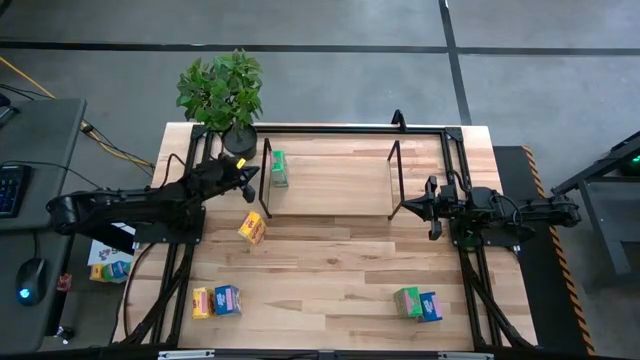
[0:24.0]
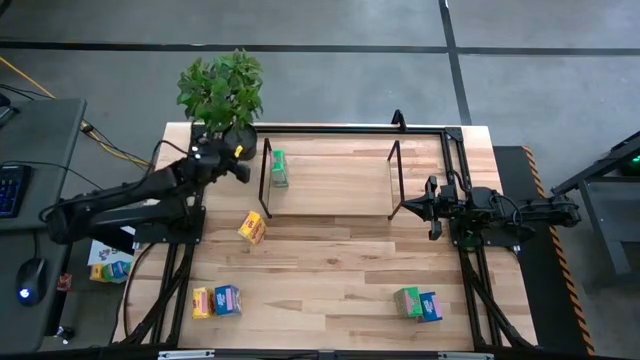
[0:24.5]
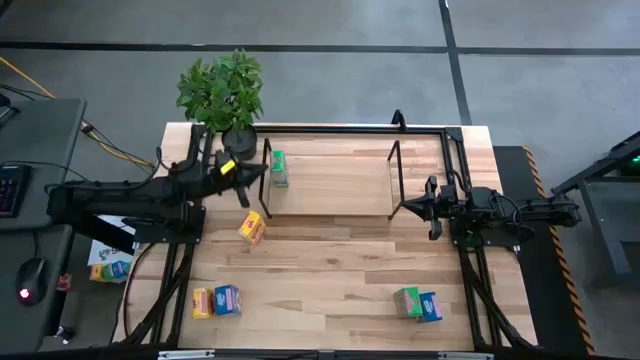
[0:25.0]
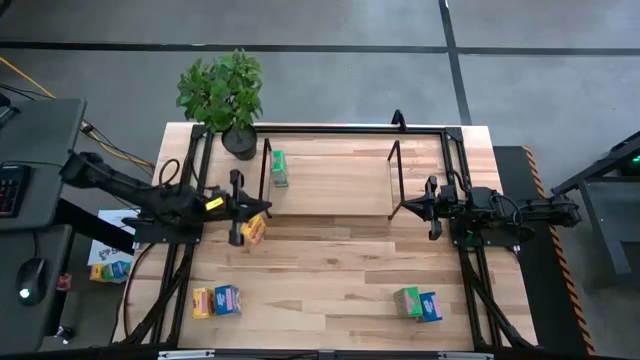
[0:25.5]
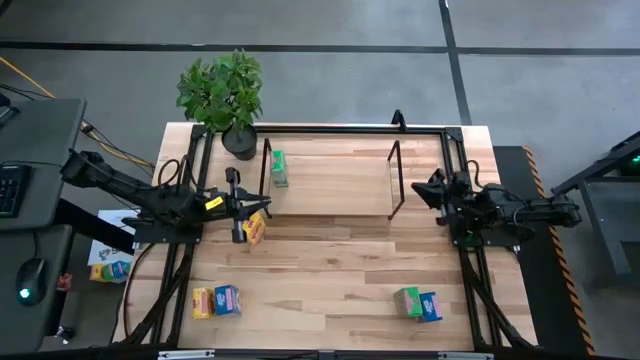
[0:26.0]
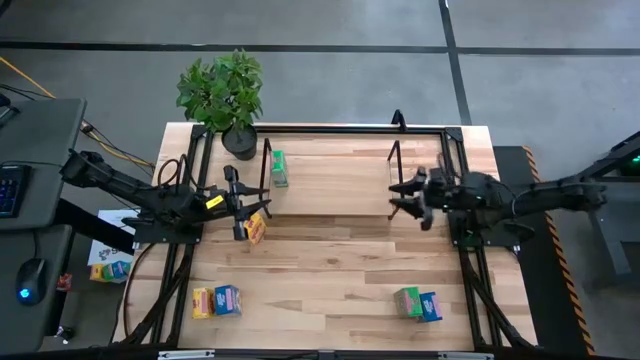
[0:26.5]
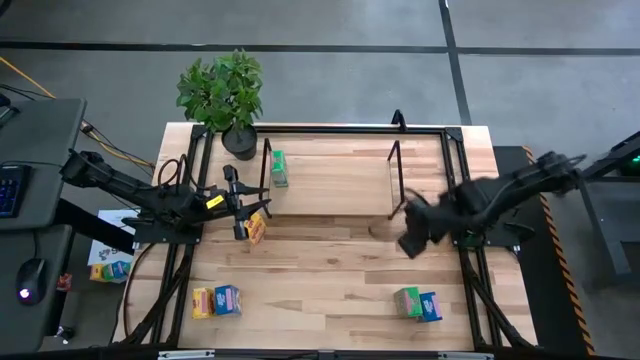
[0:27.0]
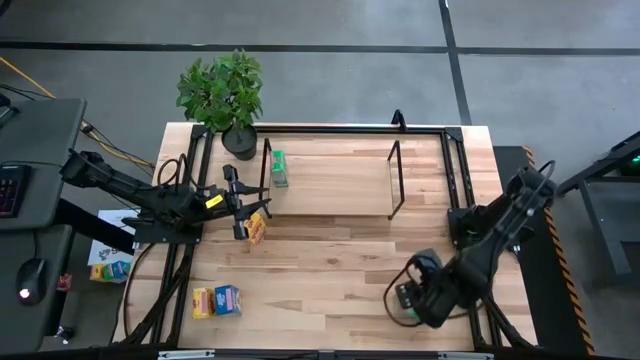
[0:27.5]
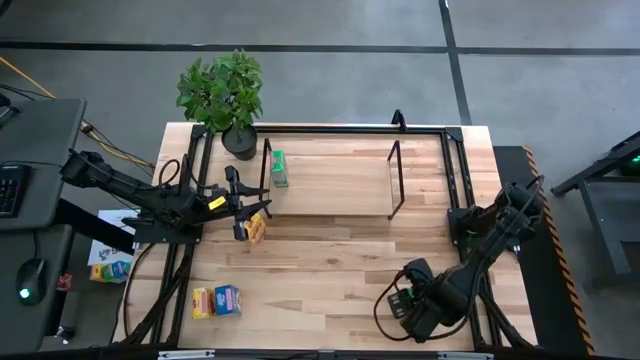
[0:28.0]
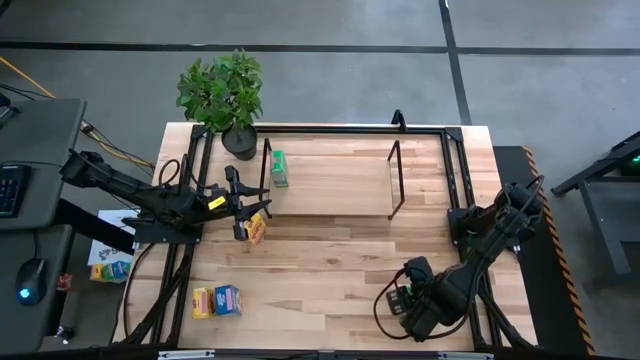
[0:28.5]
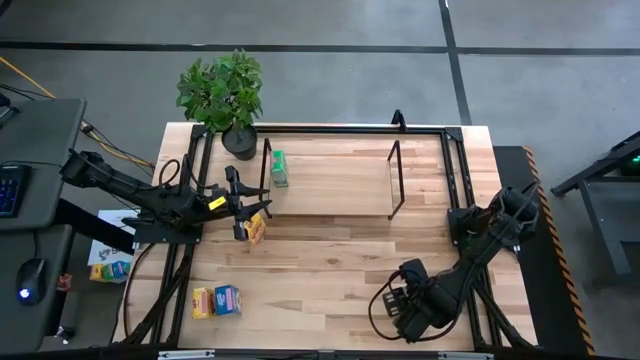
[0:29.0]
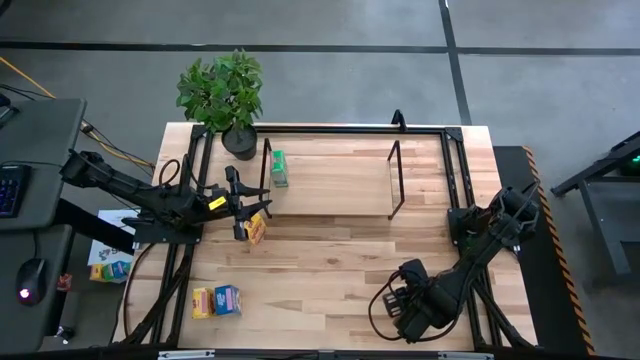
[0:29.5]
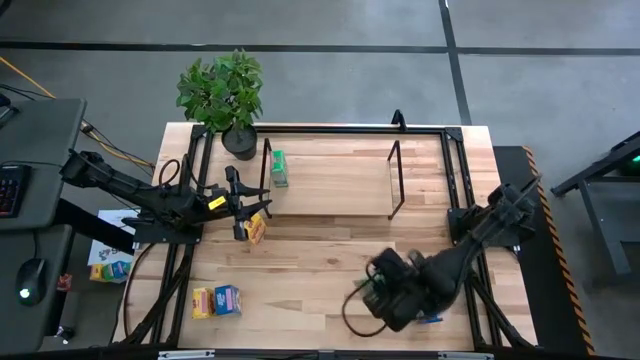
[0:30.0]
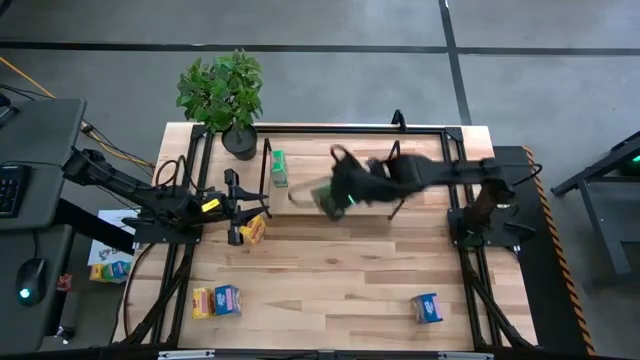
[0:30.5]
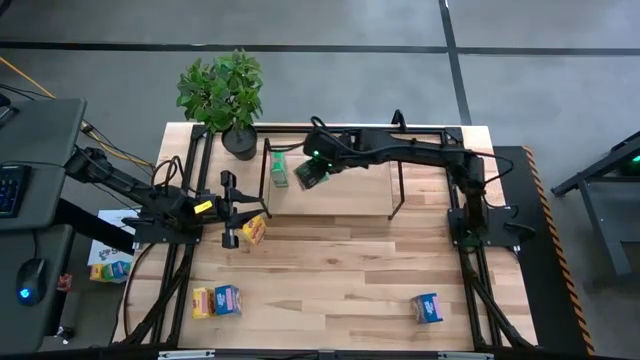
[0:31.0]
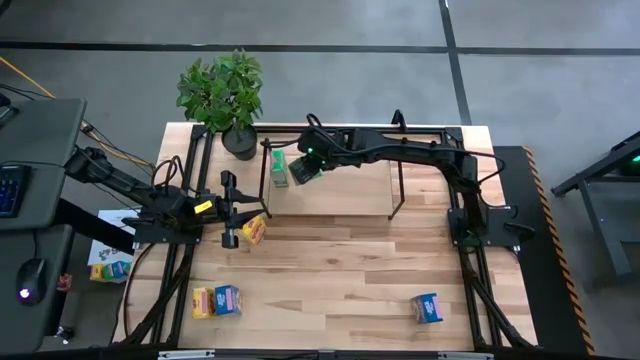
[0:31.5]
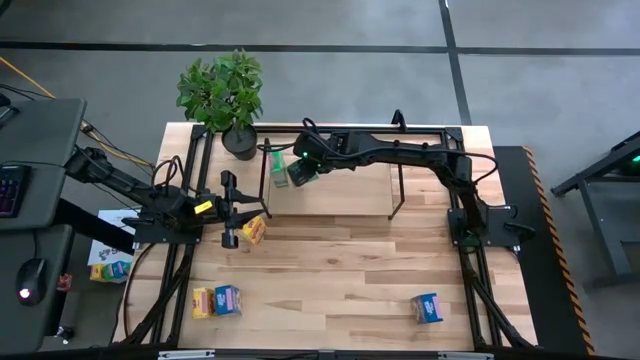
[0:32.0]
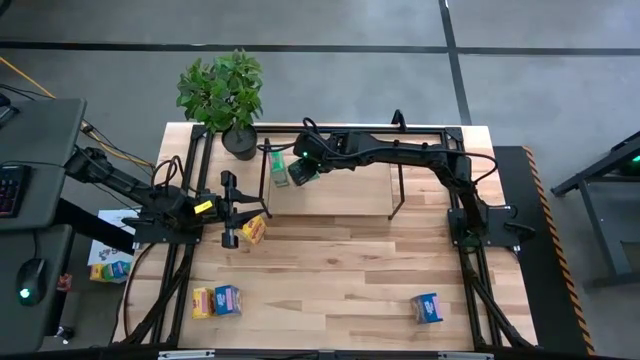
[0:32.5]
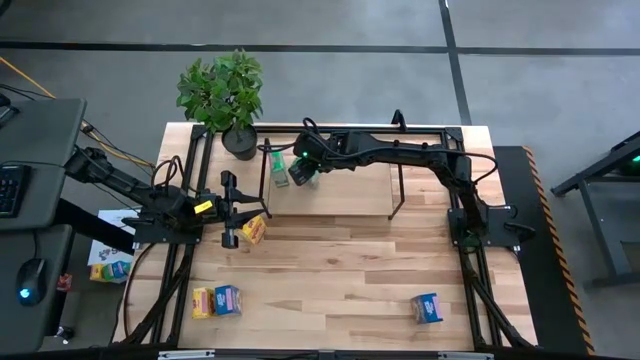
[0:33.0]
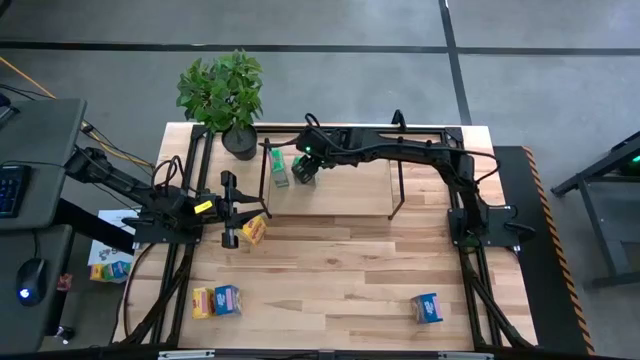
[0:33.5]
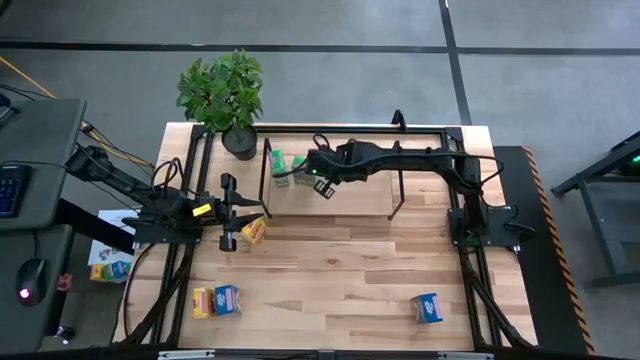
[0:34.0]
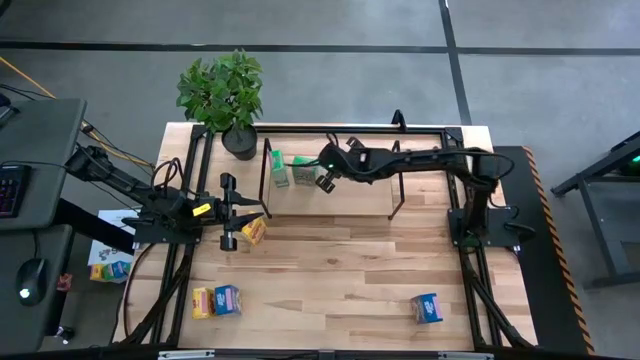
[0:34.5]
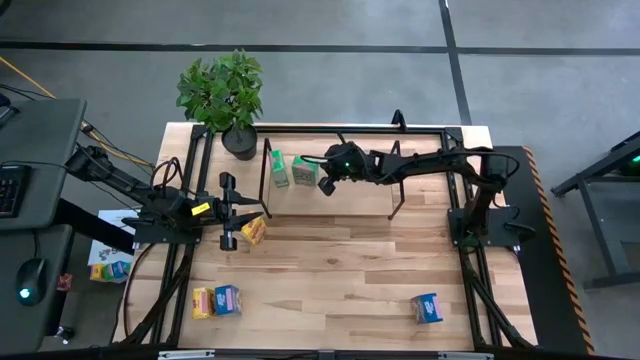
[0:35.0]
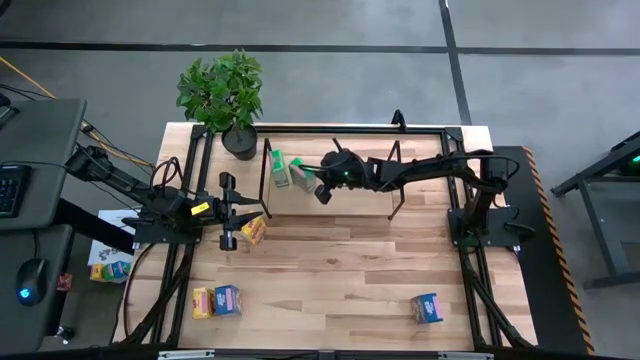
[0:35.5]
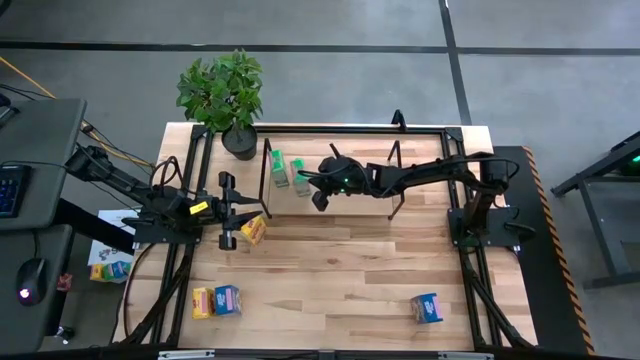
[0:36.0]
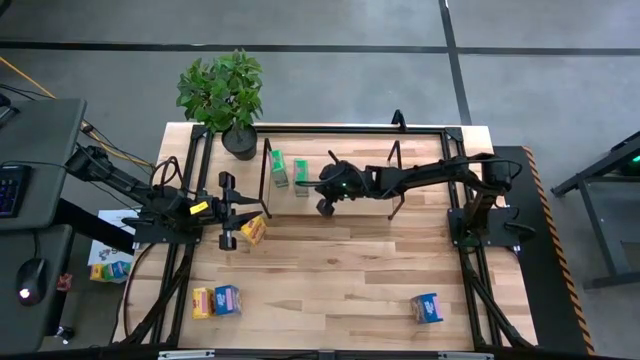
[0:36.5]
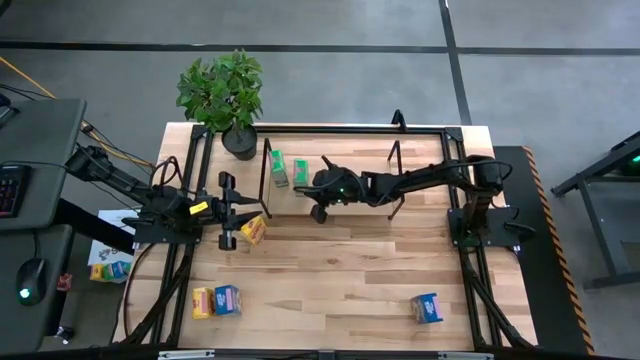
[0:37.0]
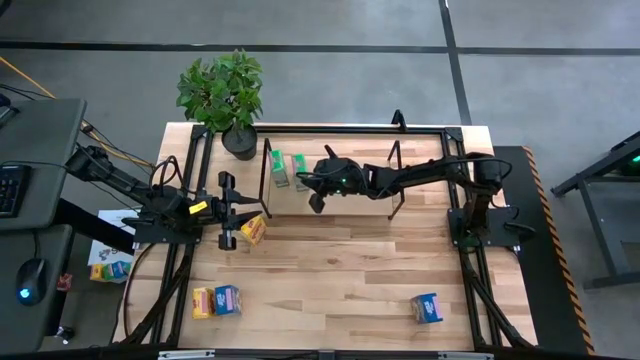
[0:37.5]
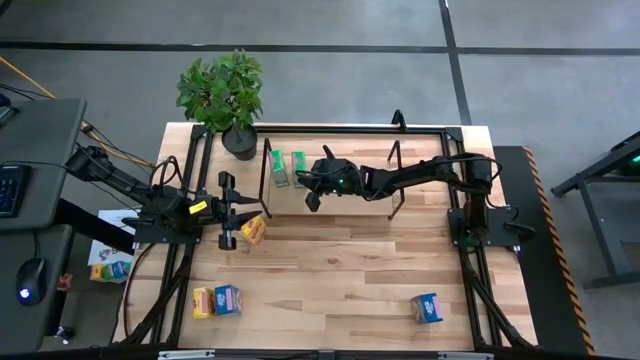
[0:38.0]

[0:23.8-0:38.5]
Task: Stack cereal on shelf
Put the green cereal box aligned with the other green cereal box on the shelf

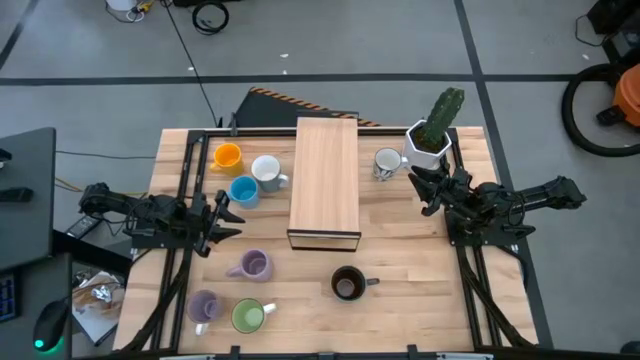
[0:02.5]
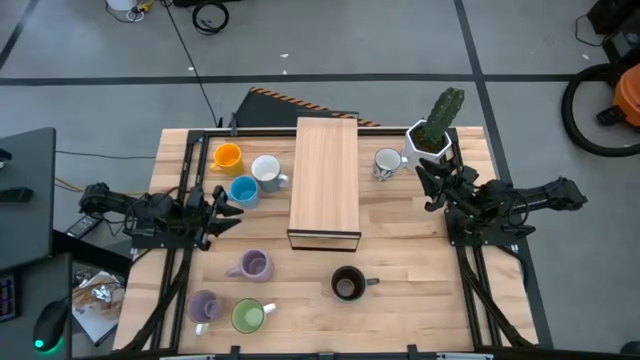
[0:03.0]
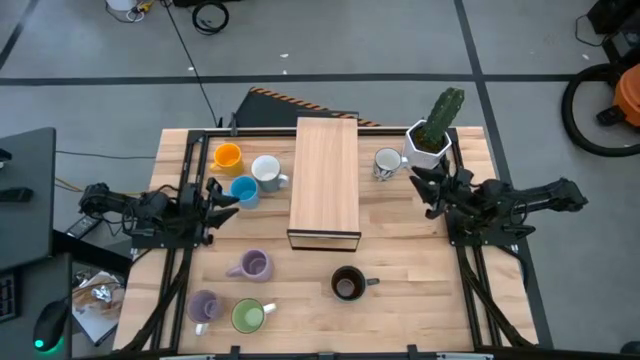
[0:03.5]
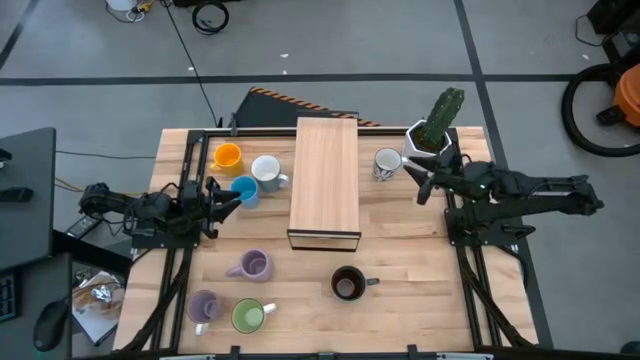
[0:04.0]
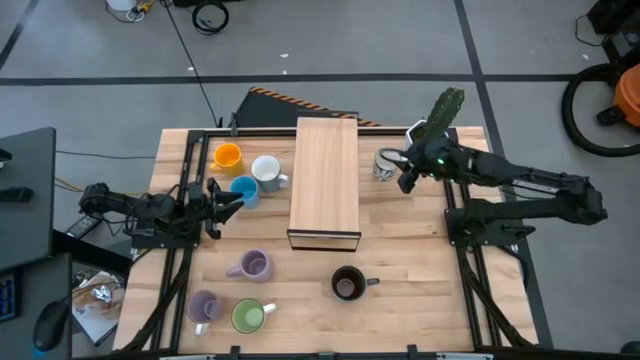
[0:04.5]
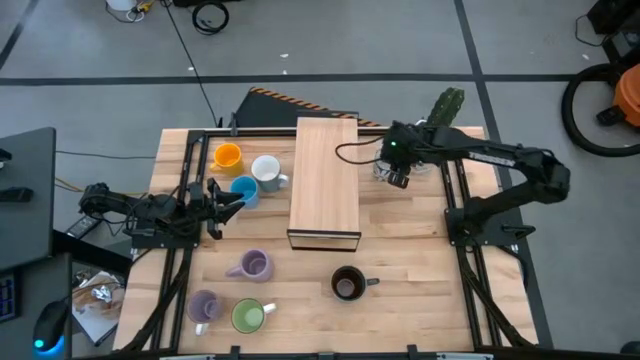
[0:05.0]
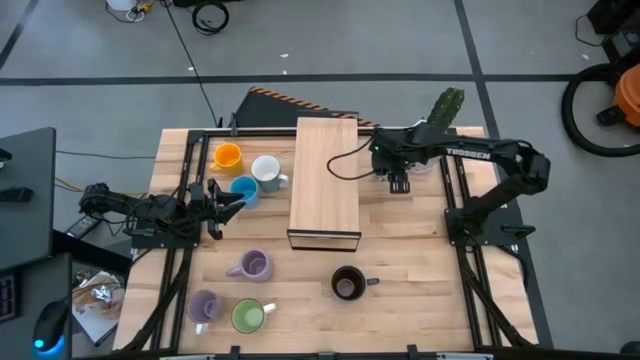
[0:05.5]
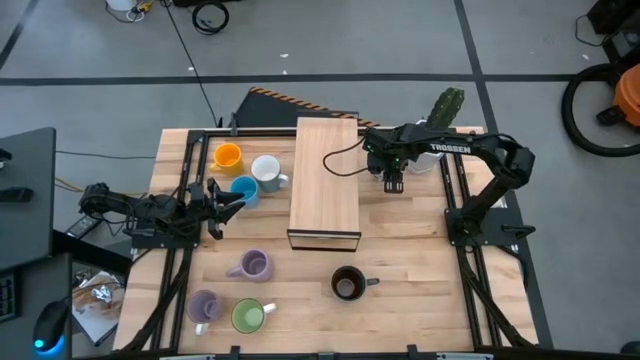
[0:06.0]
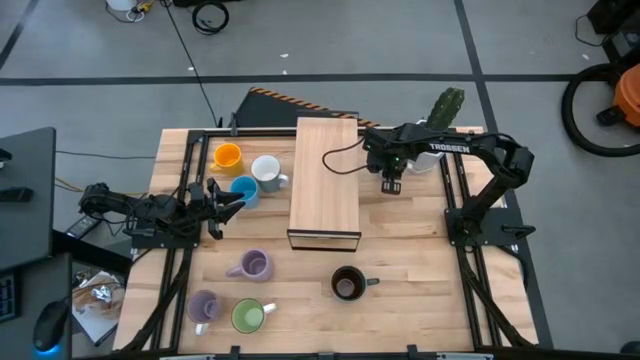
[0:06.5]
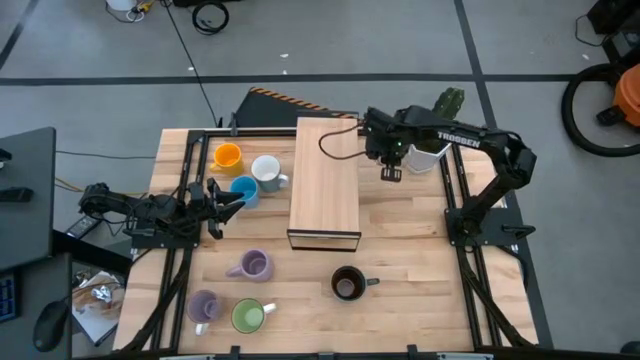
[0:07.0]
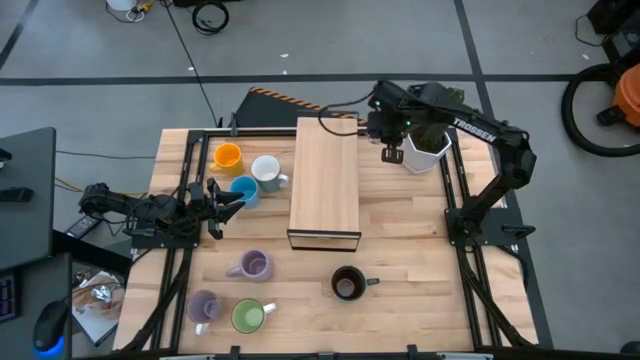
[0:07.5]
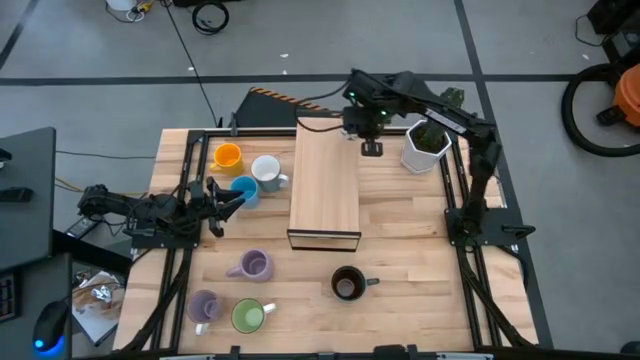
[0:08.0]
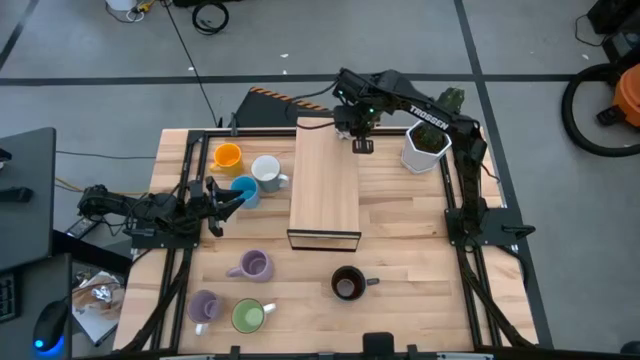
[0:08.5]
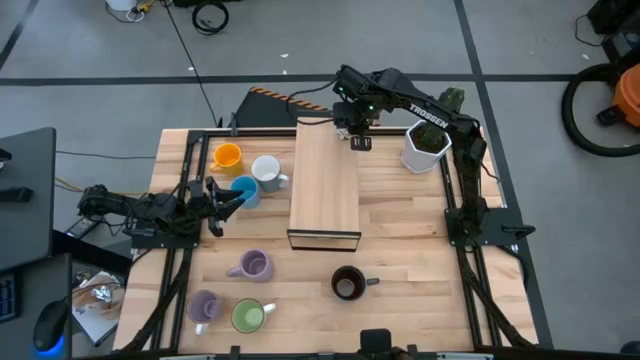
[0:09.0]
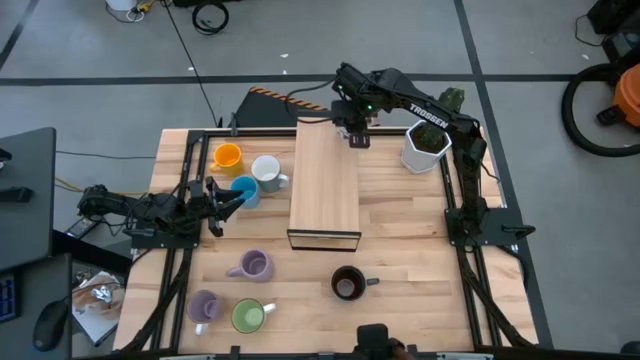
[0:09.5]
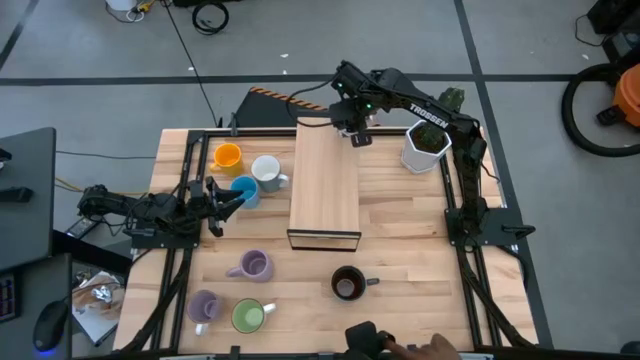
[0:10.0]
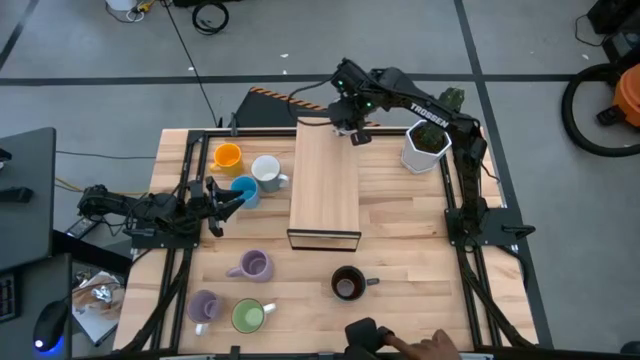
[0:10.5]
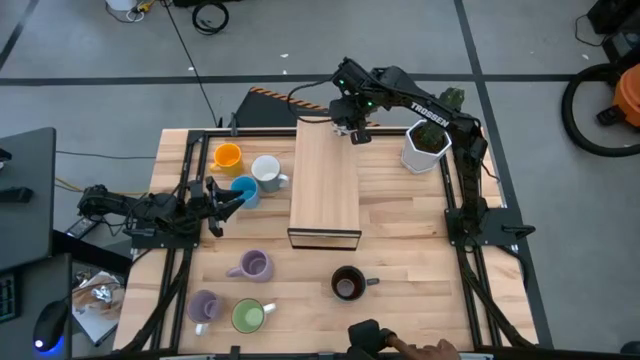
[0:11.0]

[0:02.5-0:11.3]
Task: Place coffee mugs
Put the blue white mug on the shelf
